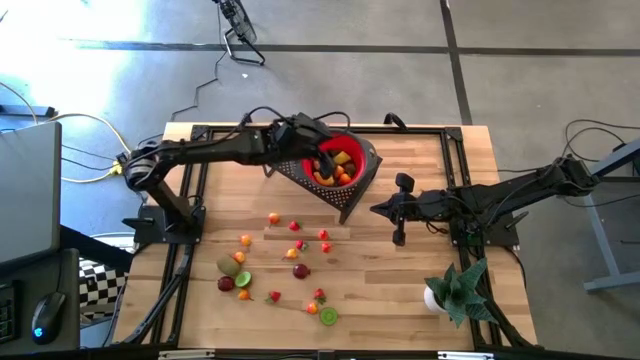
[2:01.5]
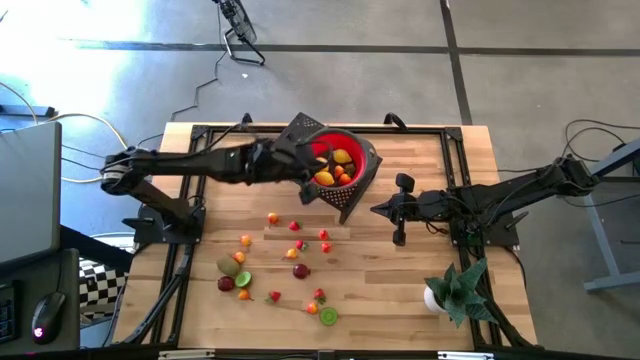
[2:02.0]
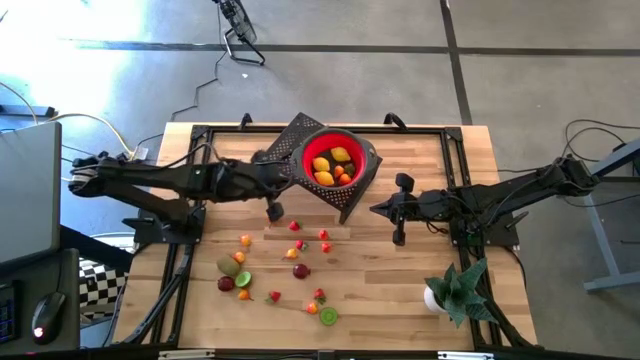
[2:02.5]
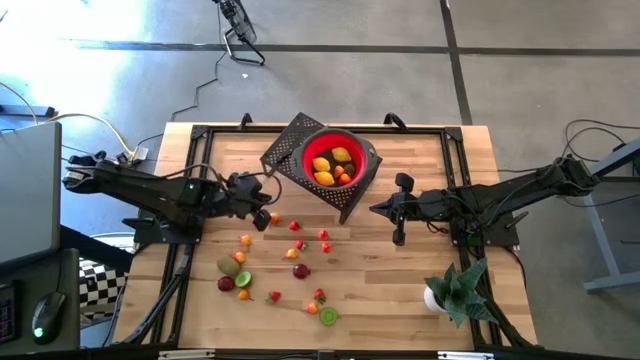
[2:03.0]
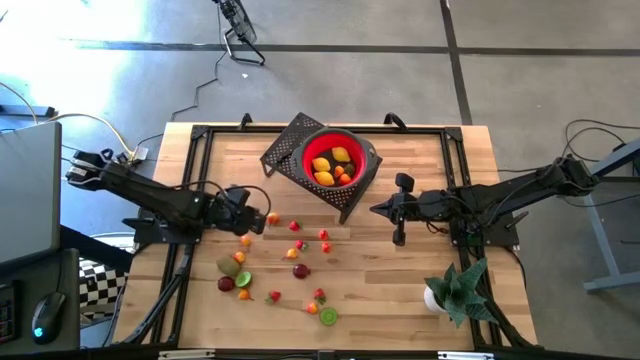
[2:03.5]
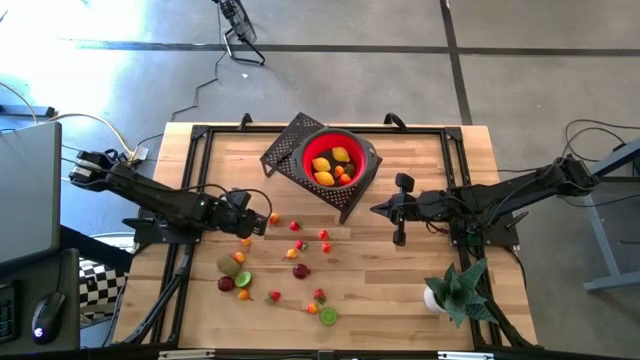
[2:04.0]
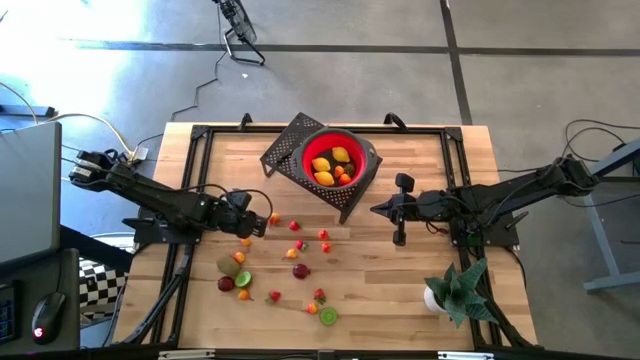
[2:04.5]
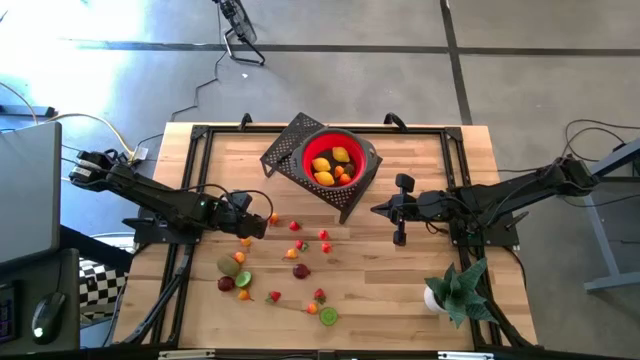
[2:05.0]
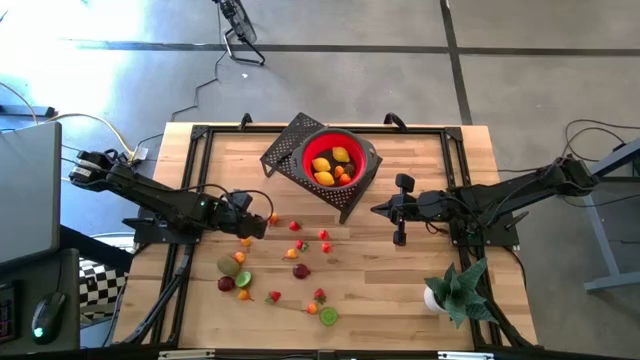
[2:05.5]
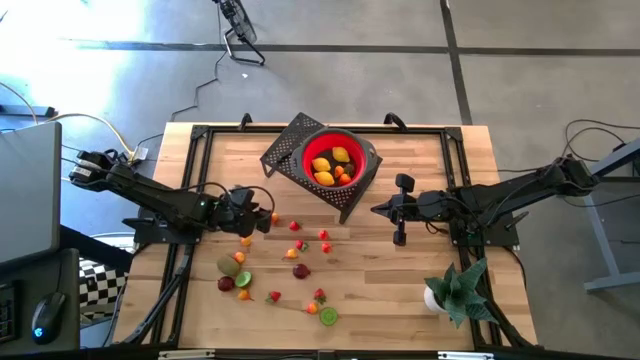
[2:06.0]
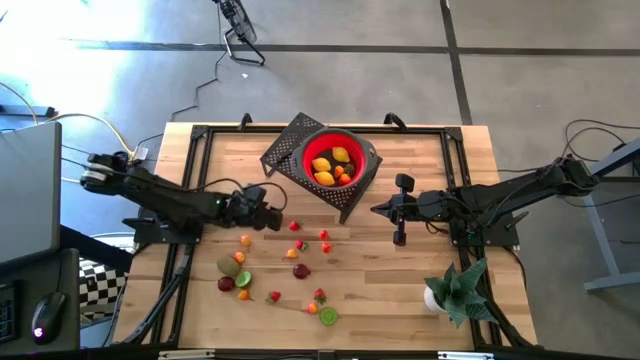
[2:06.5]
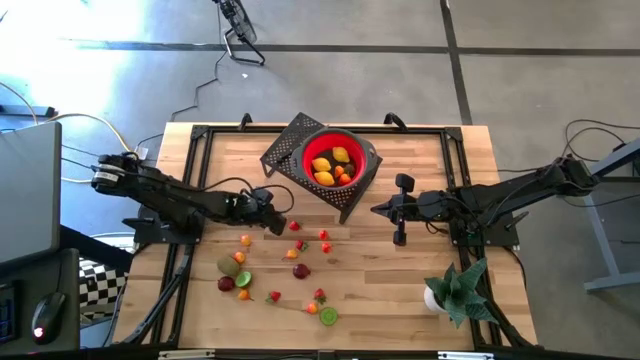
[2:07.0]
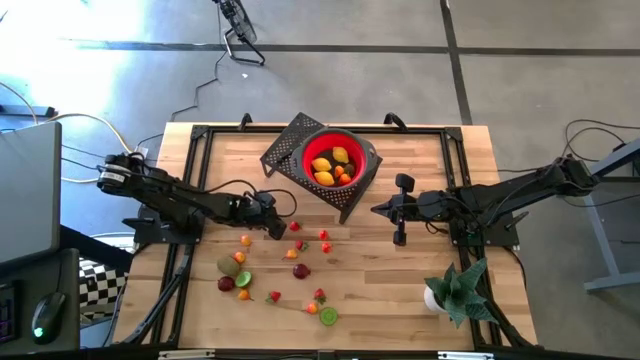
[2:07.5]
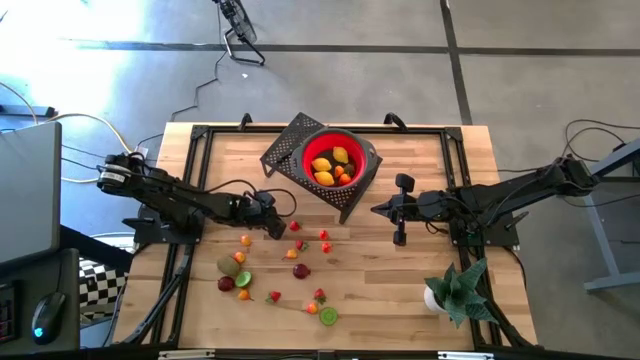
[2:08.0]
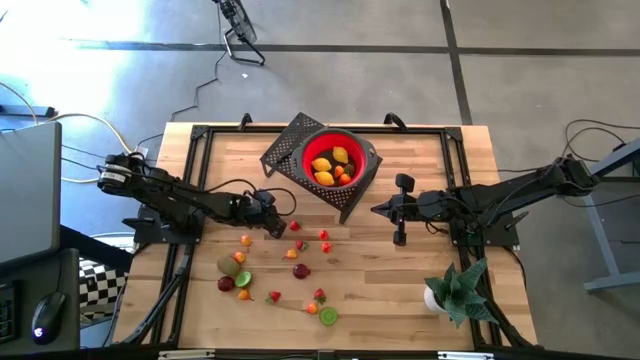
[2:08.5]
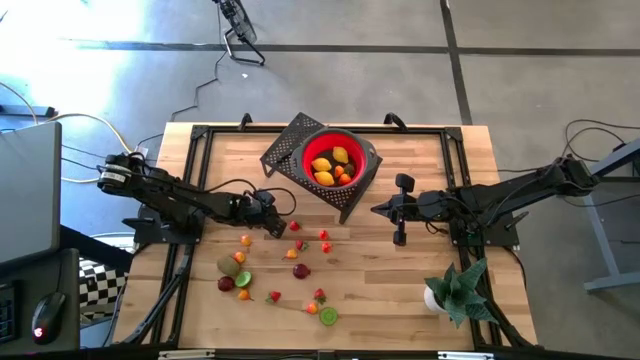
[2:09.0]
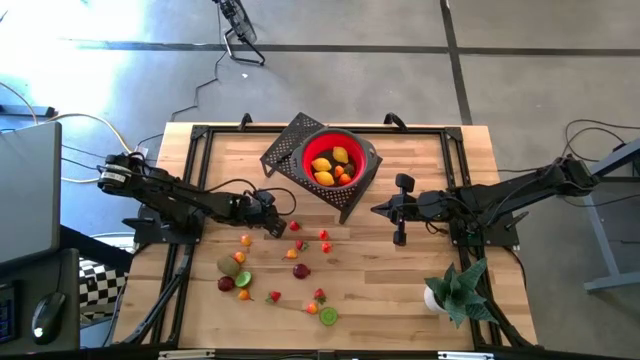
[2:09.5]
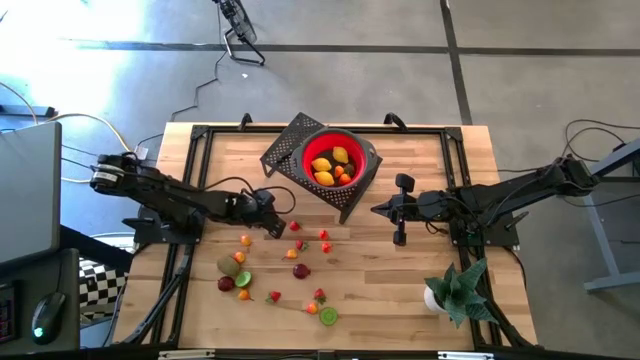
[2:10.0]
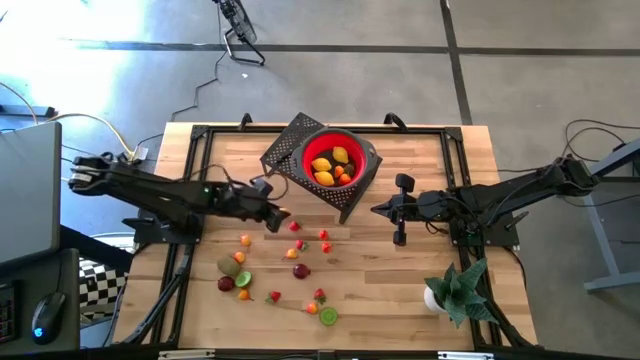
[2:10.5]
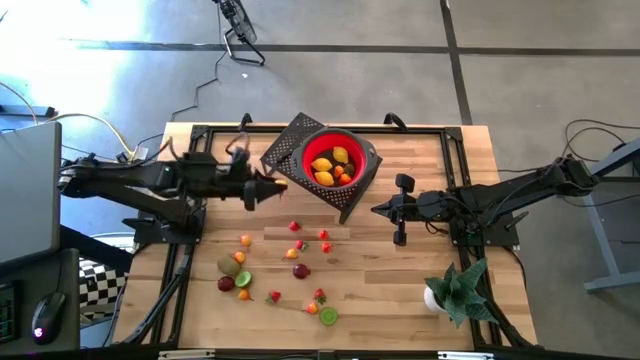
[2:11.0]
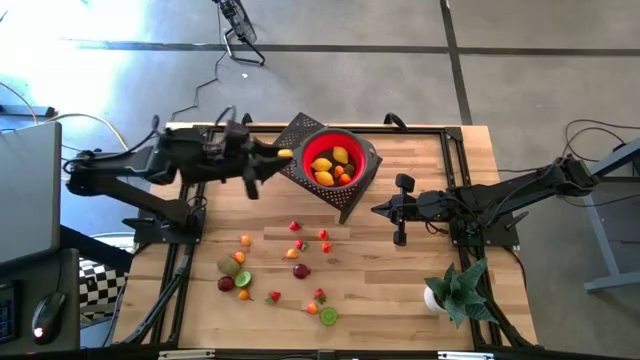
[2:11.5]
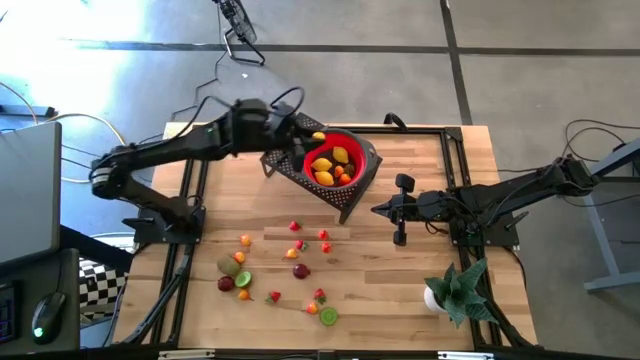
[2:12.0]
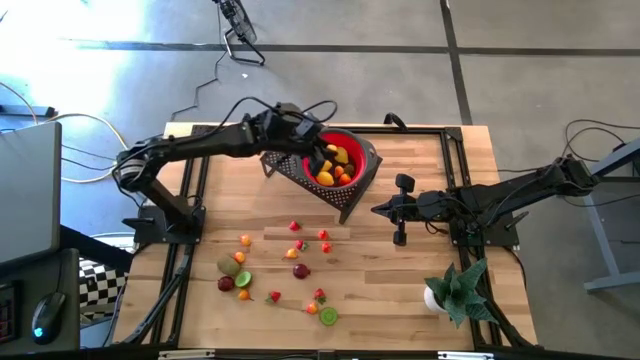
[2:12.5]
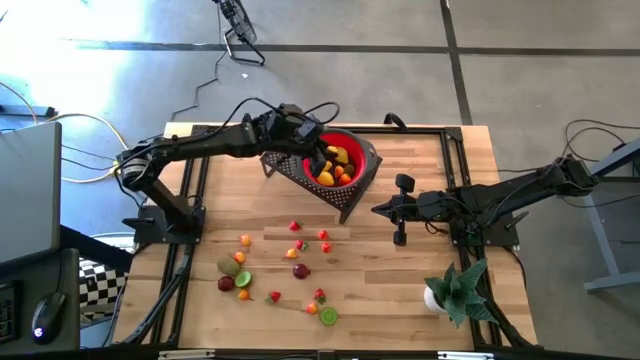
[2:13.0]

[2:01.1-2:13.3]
Task: Pick & Place Fruit
Put the pear into the strainer bowl on the shelf

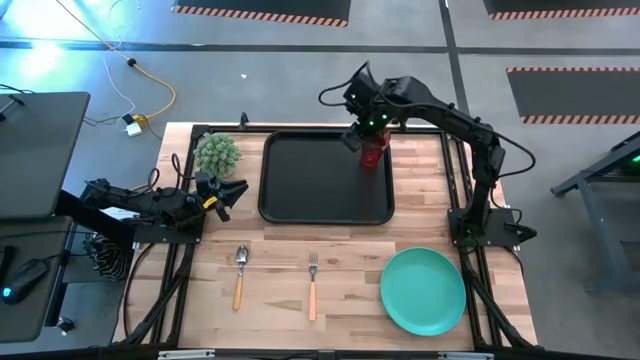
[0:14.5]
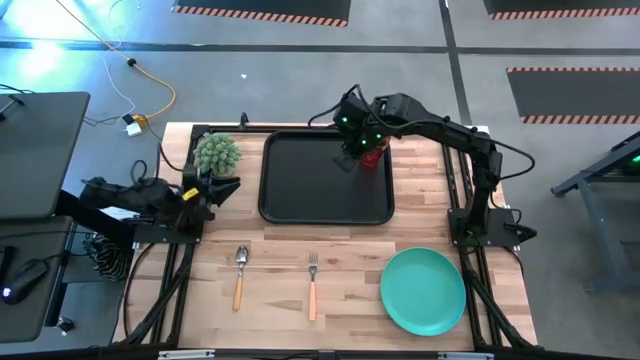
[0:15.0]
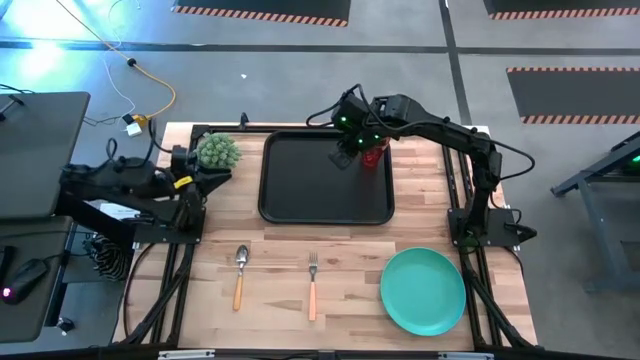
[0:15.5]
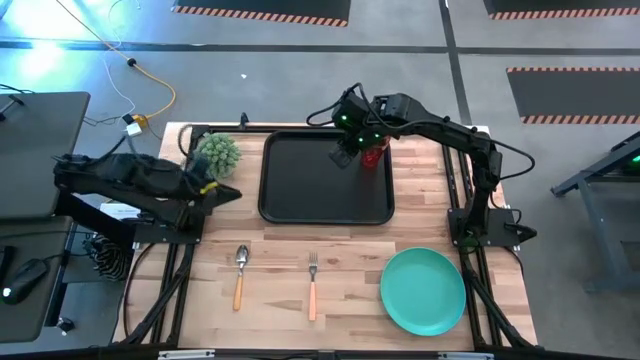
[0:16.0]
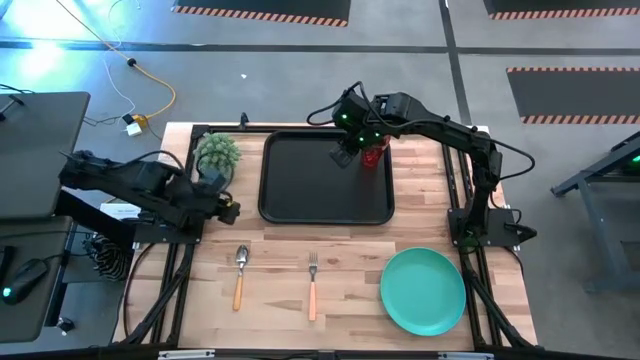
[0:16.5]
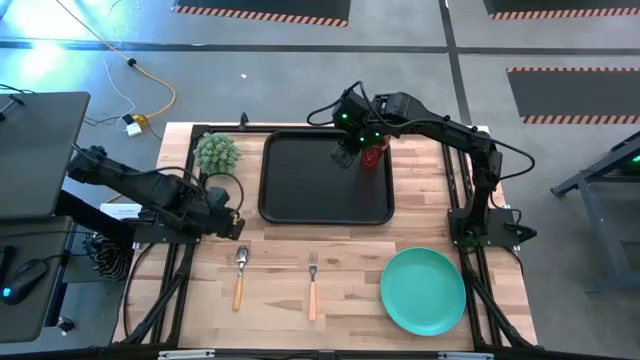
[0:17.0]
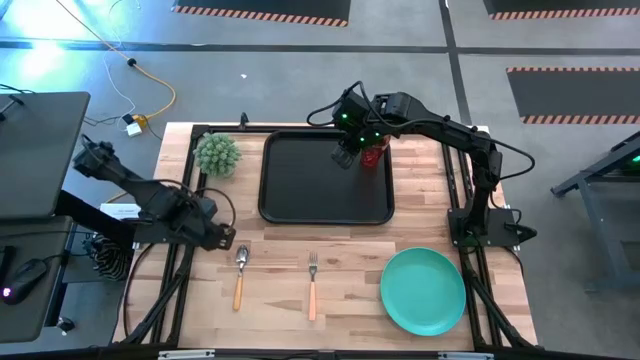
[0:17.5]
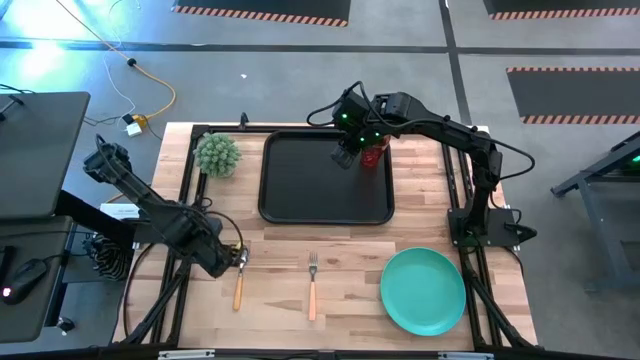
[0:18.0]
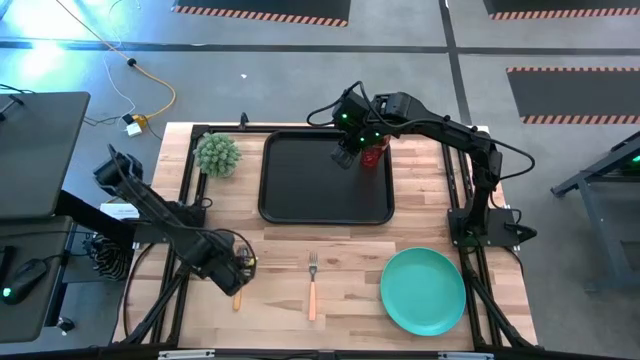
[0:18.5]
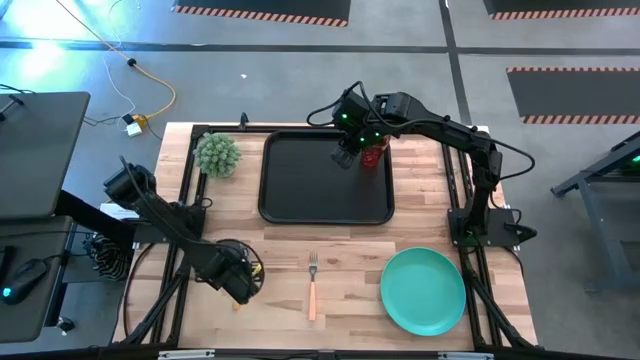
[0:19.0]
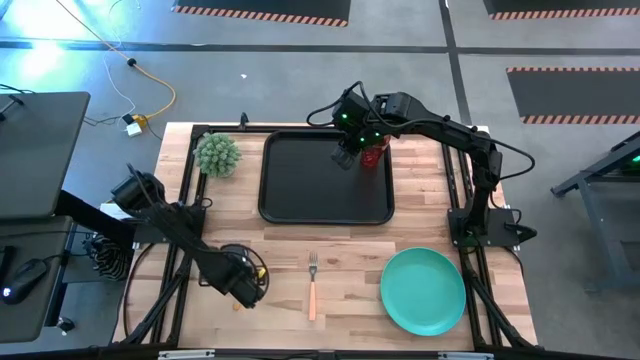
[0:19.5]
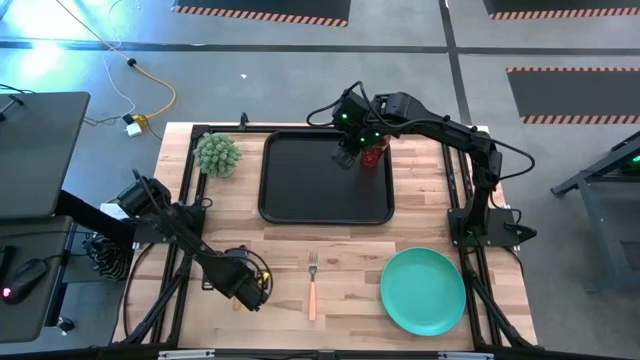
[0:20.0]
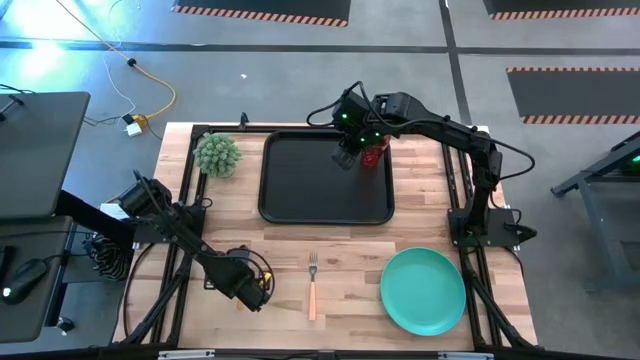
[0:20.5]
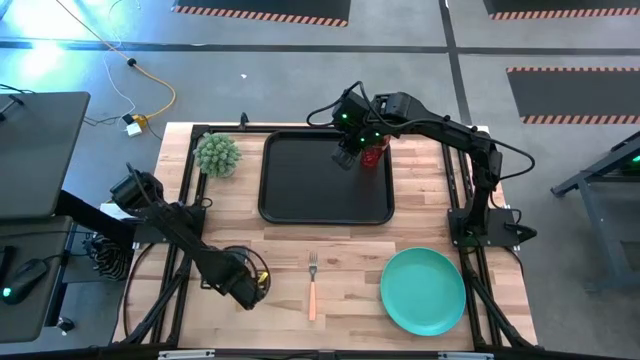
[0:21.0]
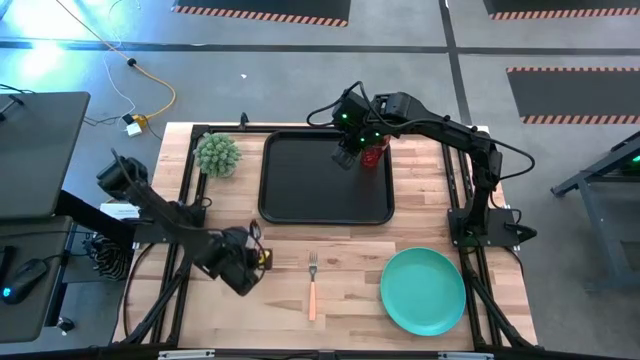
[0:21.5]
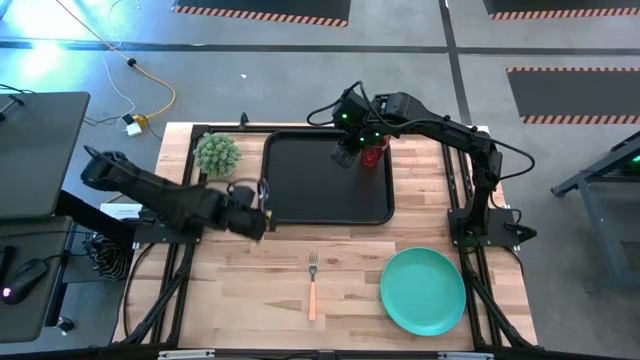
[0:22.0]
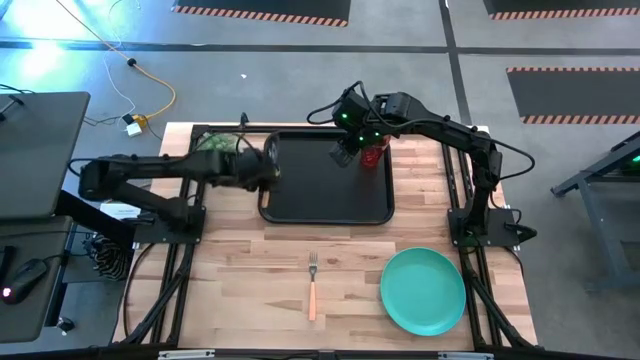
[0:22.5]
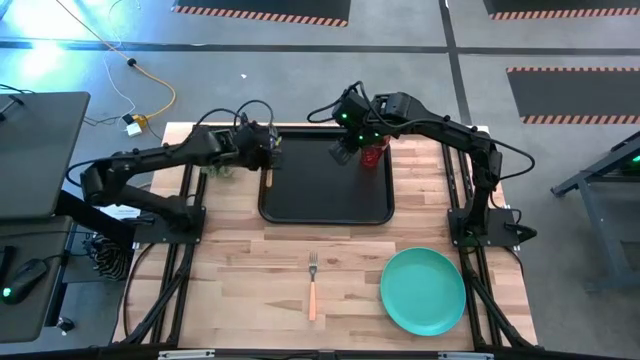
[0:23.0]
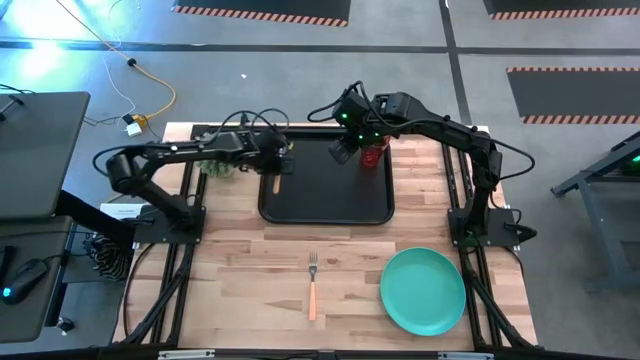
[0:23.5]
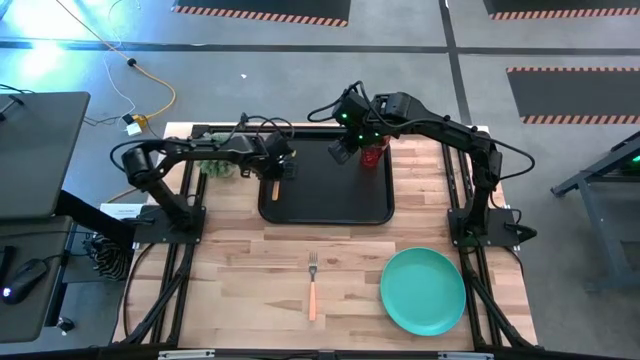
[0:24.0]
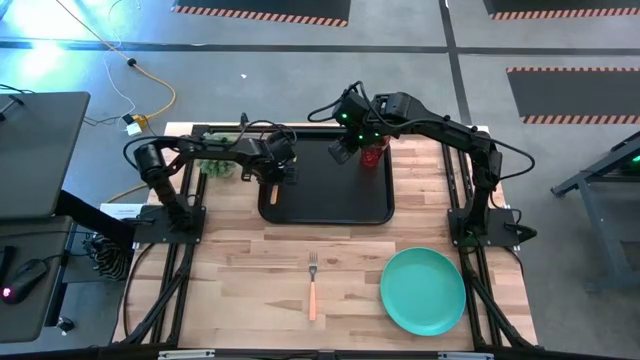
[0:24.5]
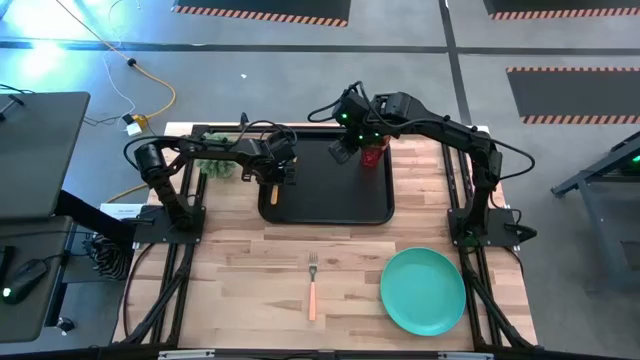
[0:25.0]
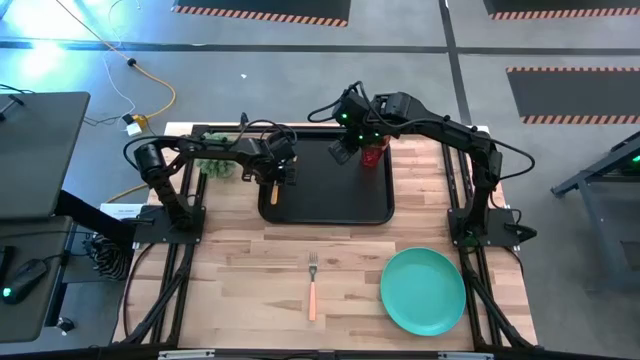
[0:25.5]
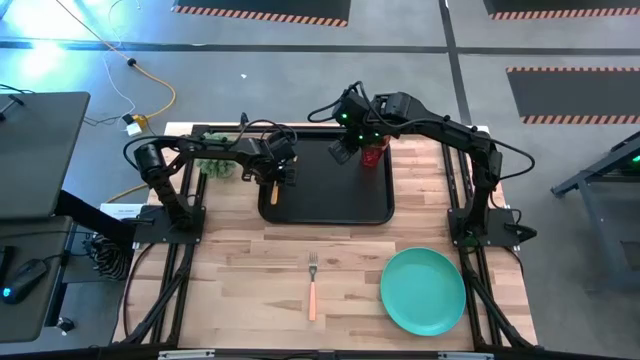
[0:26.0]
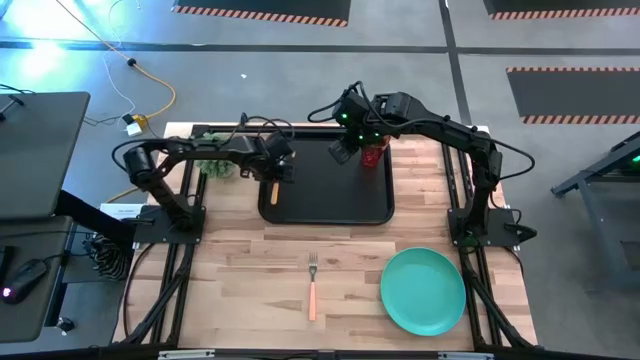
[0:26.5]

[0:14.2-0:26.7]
Task: Pick and place plate/cup/fork/spoon on tray
Put the yellow spoon on the black table tray
